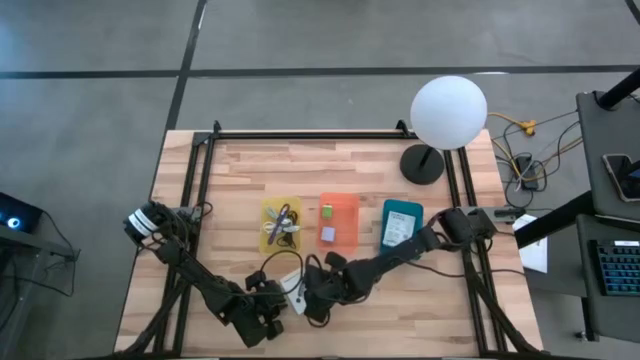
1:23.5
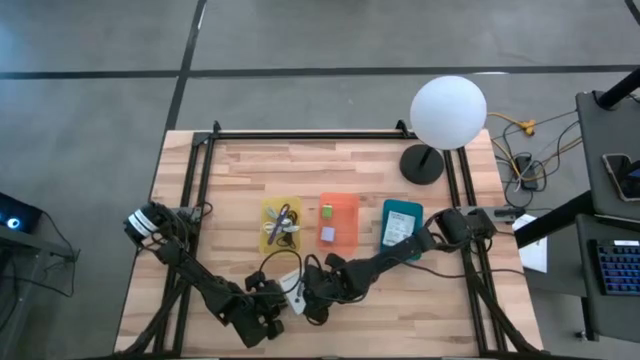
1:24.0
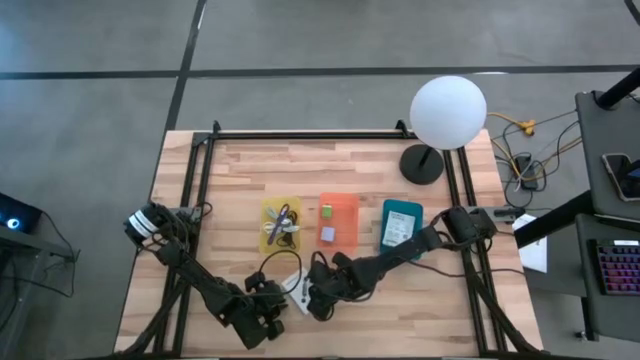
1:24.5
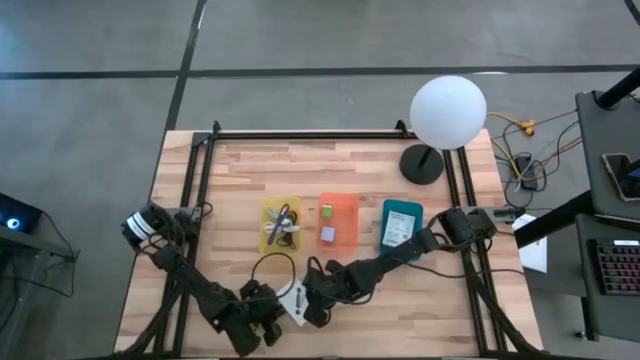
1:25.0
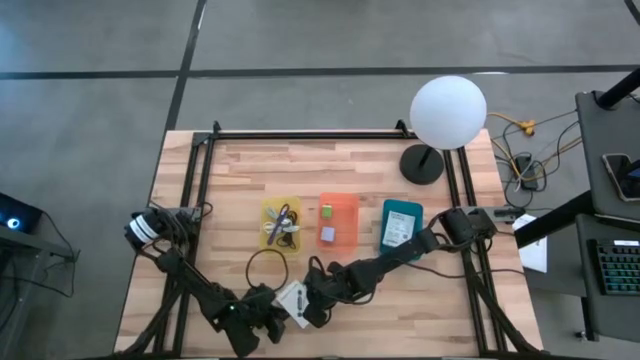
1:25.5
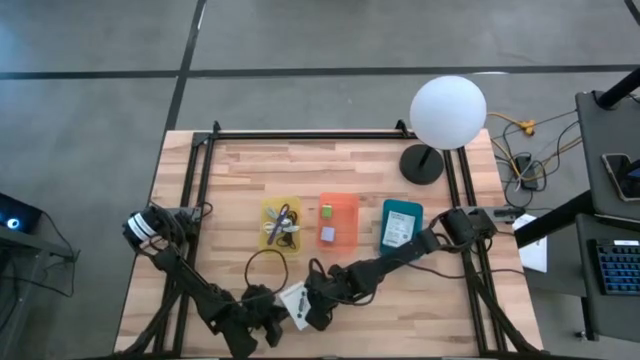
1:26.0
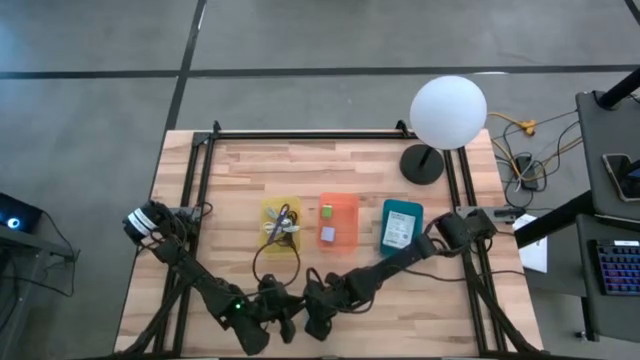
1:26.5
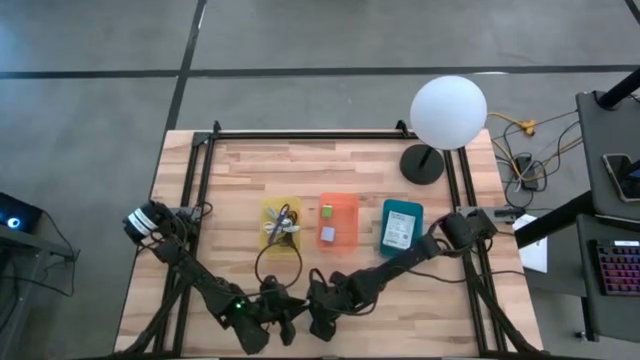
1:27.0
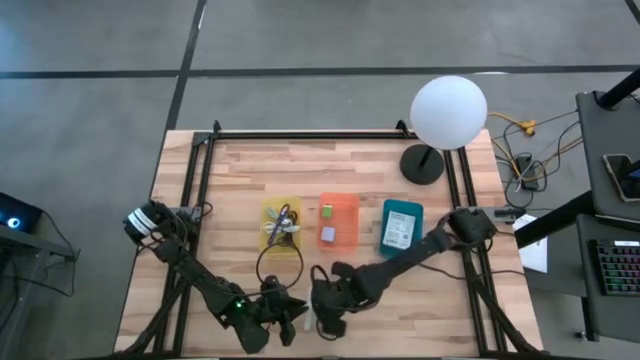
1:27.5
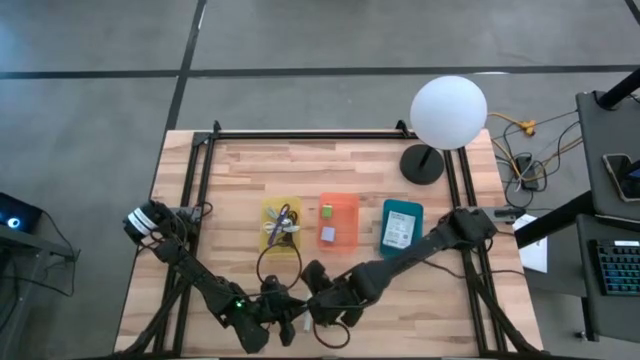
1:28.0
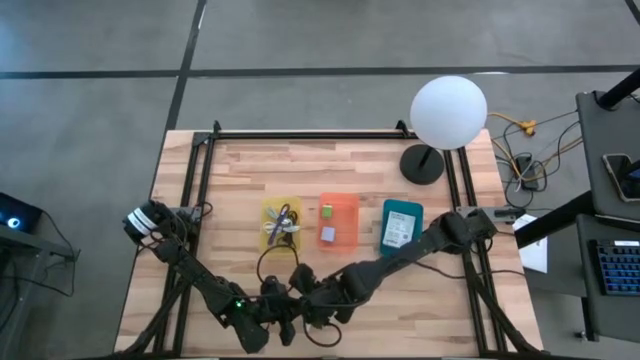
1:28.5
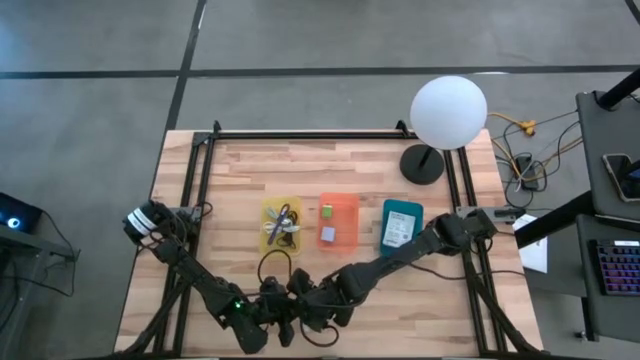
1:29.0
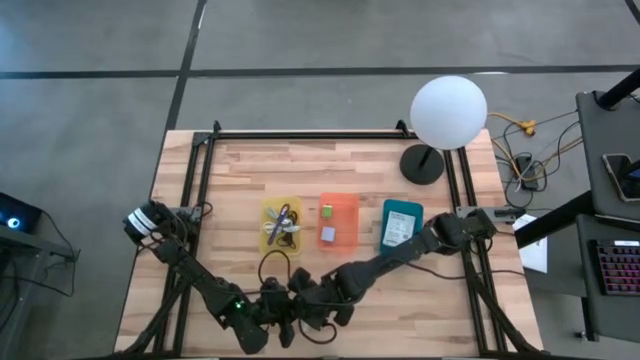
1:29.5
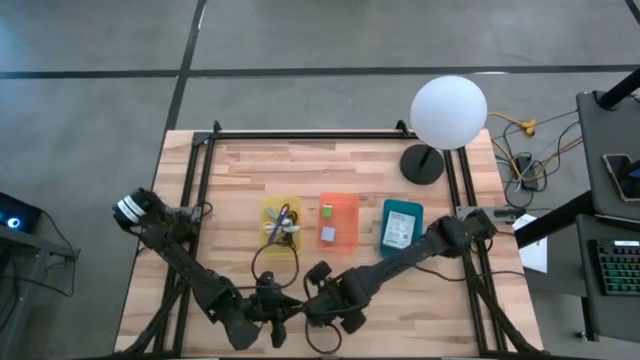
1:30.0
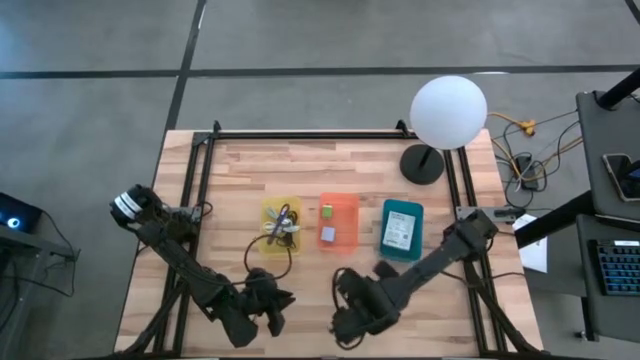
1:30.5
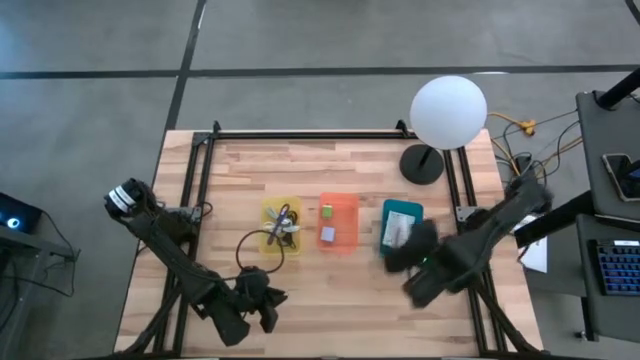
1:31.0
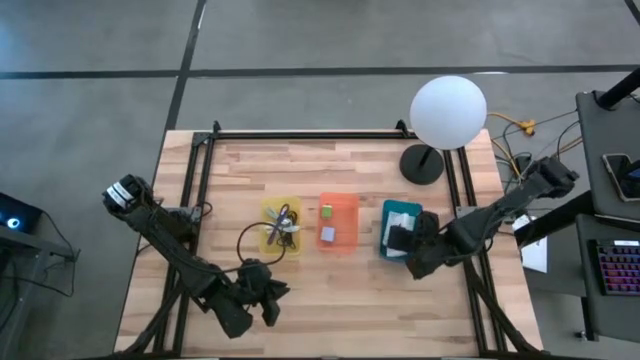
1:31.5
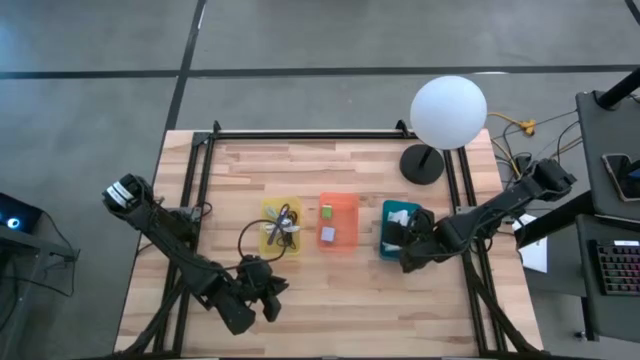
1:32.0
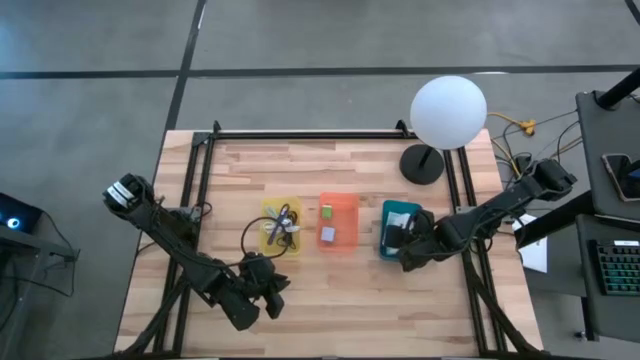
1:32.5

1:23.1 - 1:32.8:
Task: Pick and place items into bin
Put the white card reader box into the blue bin

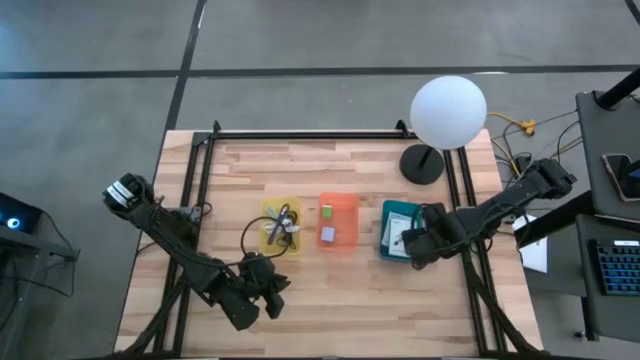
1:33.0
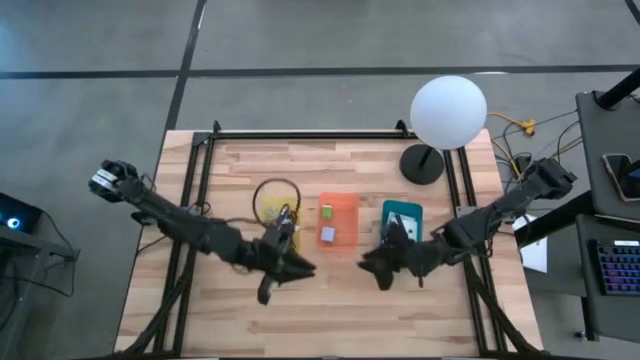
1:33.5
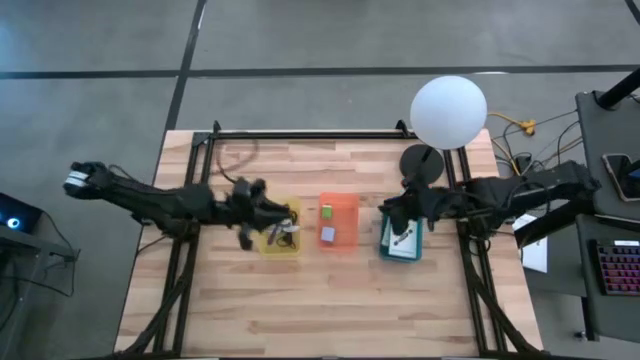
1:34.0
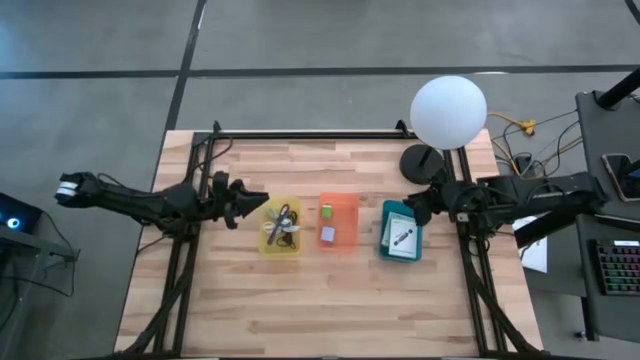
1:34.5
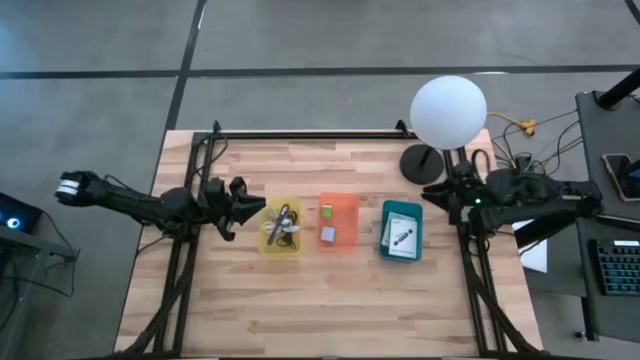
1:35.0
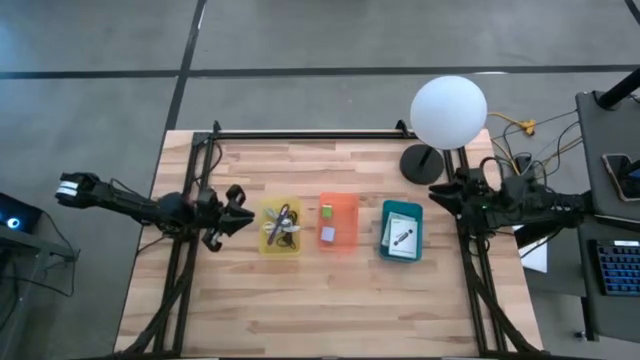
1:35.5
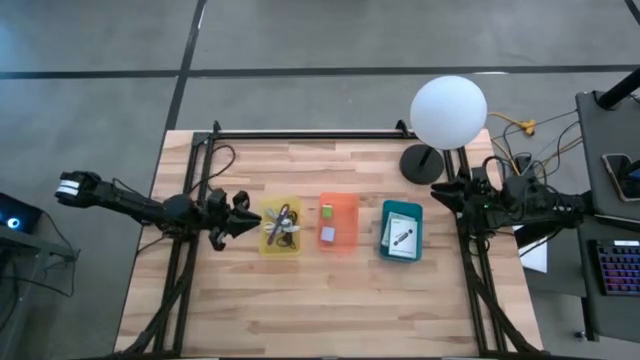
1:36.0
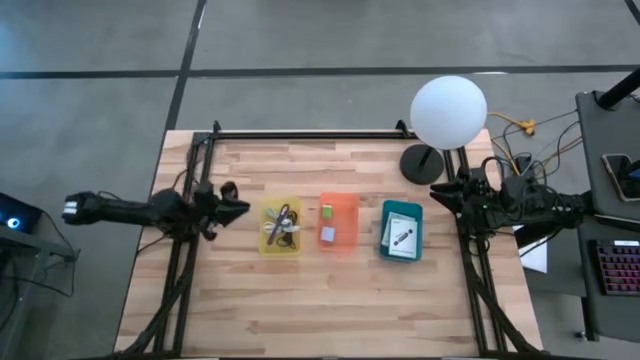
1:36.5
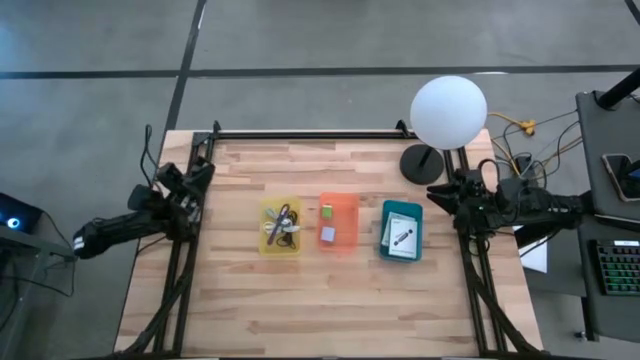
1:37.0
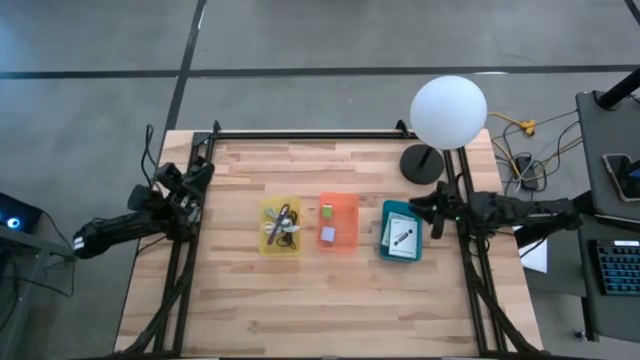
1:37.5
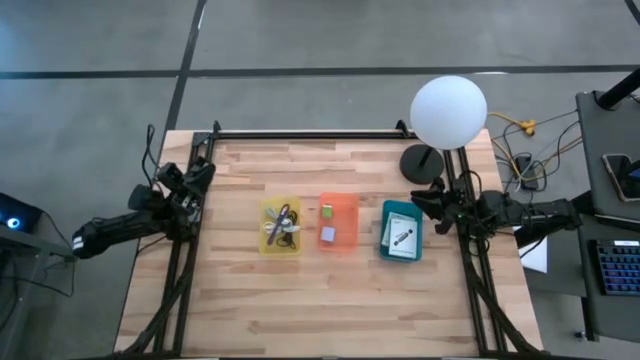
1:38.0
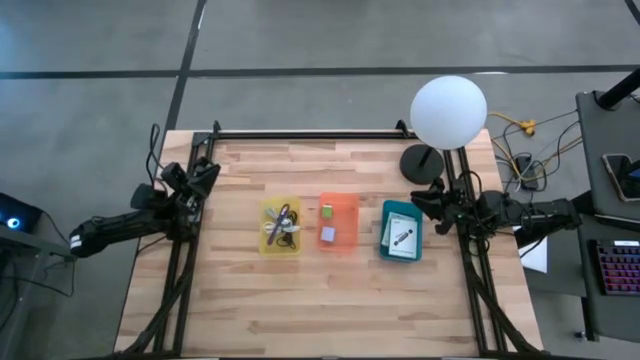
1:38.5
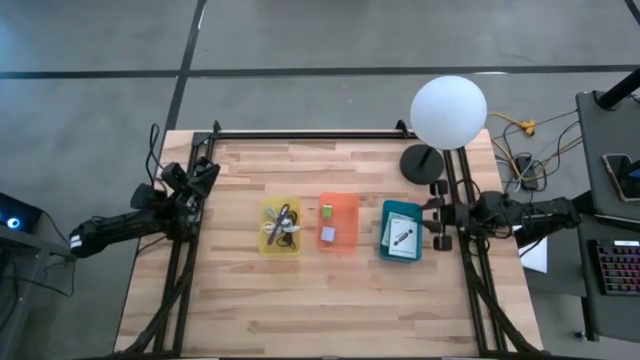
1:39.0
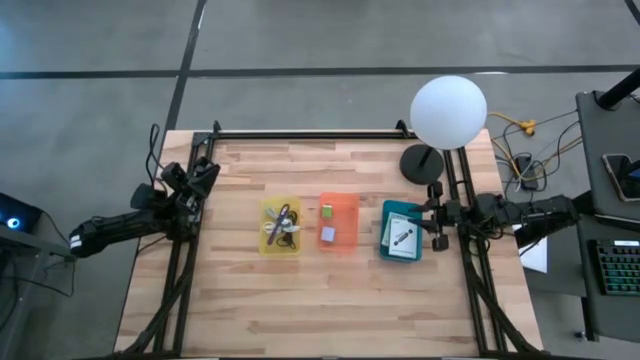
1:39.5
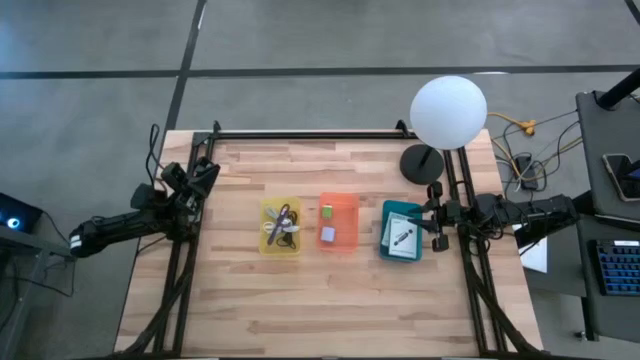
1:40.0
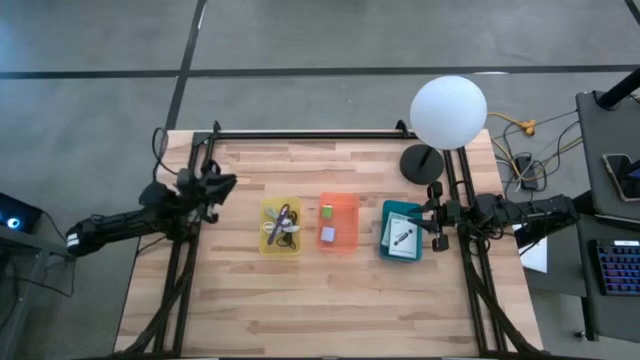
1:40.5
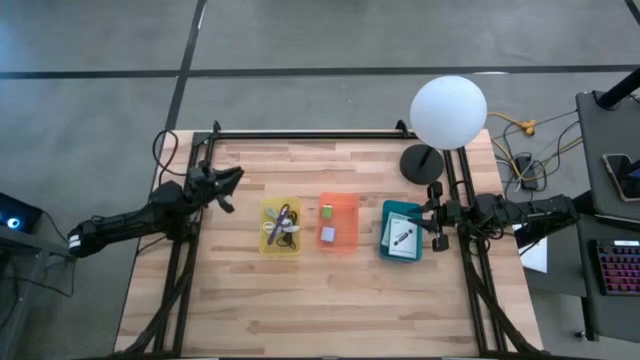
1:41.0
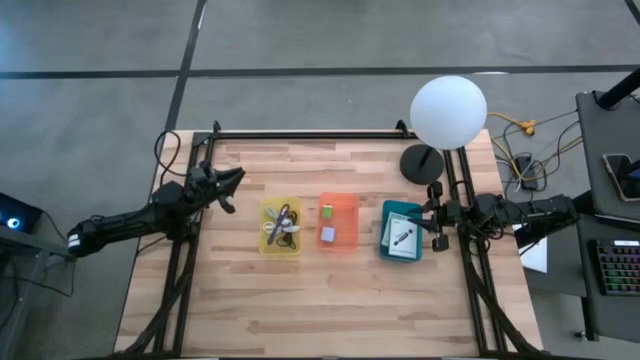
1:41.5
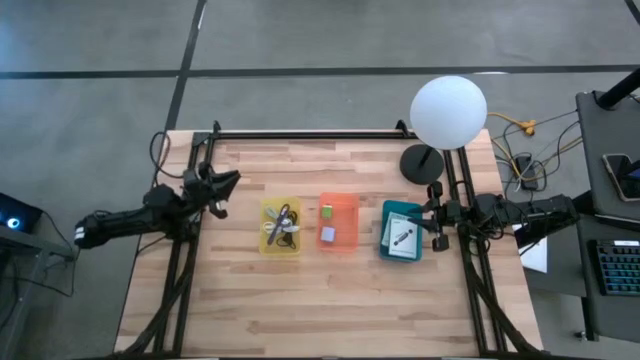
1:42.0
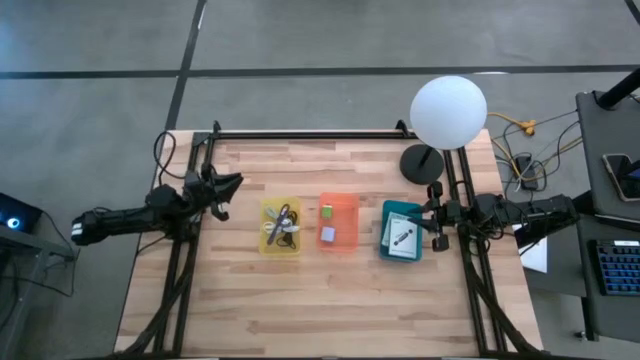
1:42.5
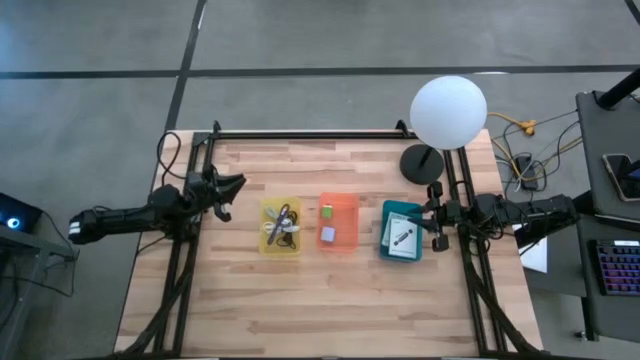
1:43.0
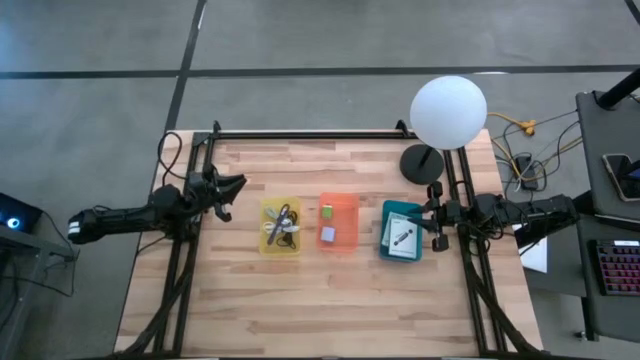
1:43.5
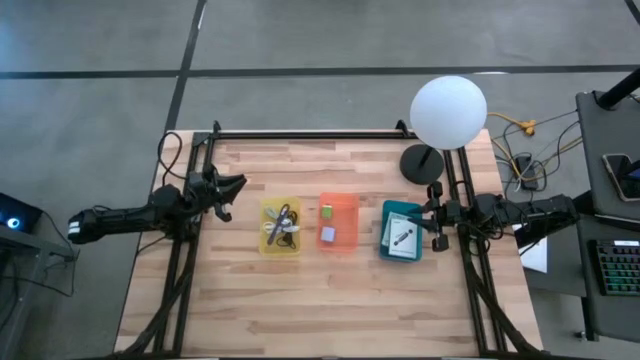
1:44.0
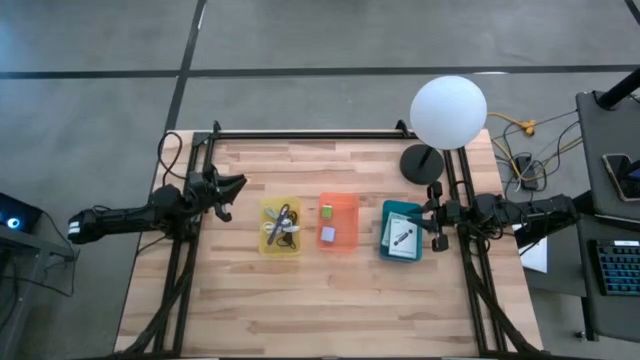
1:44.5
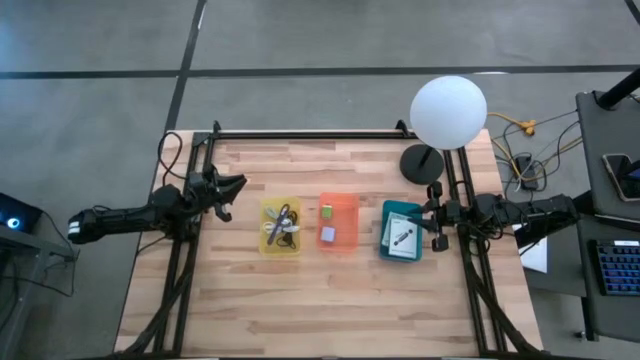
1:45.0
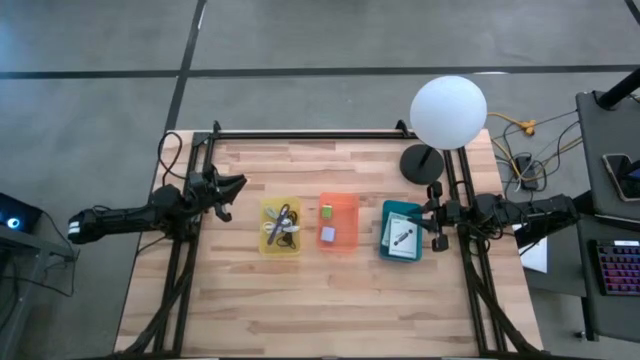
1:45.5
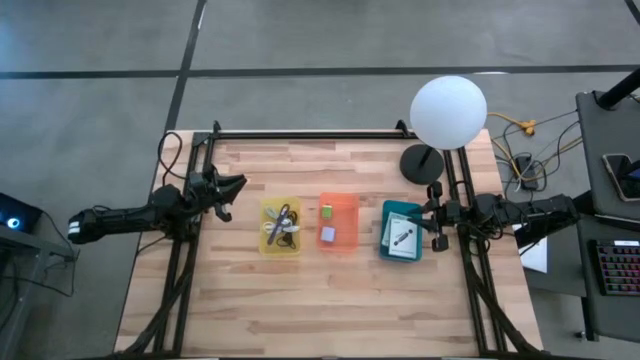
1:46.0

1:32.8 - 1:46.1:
Return to Home Position
